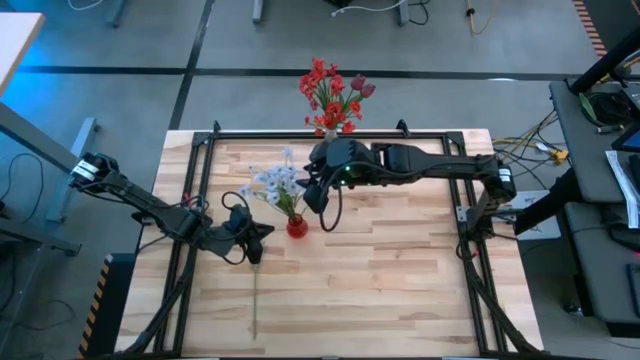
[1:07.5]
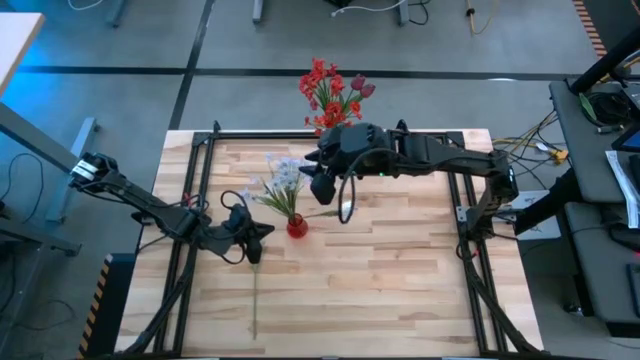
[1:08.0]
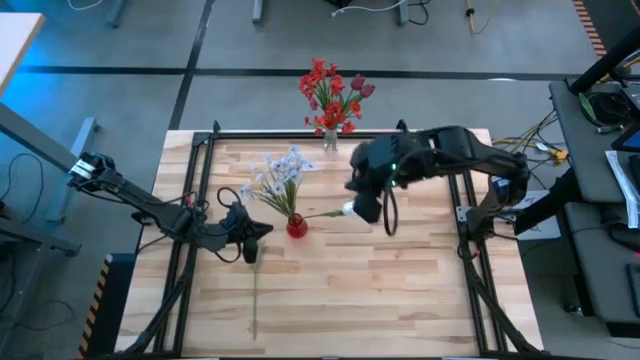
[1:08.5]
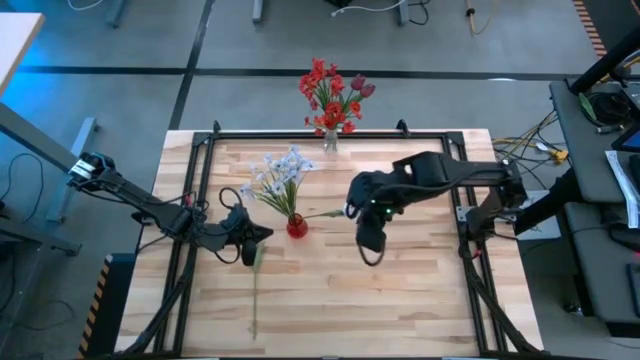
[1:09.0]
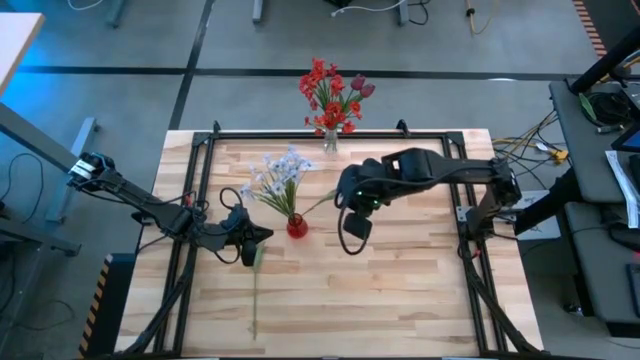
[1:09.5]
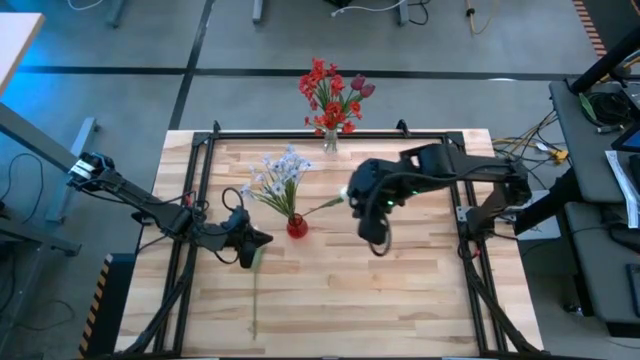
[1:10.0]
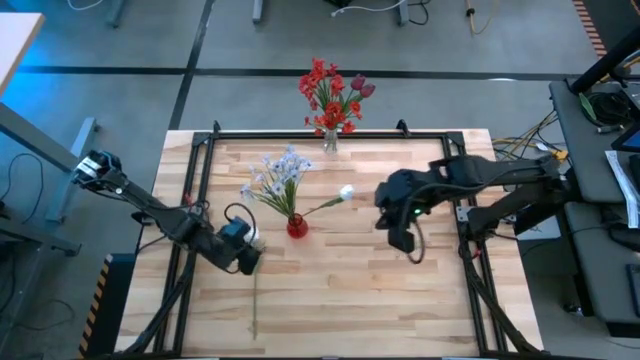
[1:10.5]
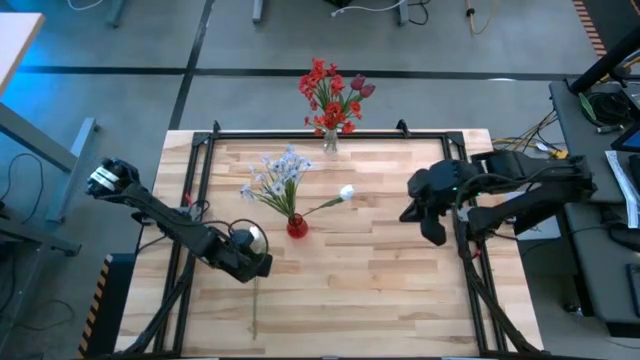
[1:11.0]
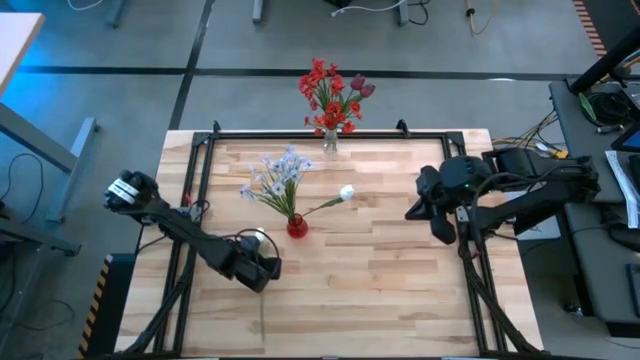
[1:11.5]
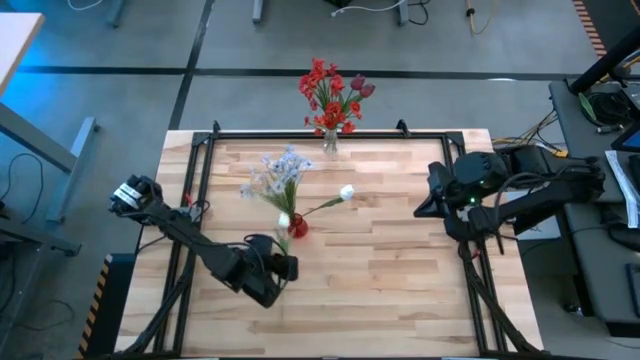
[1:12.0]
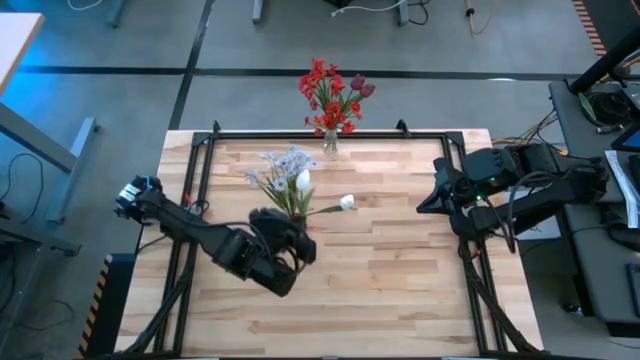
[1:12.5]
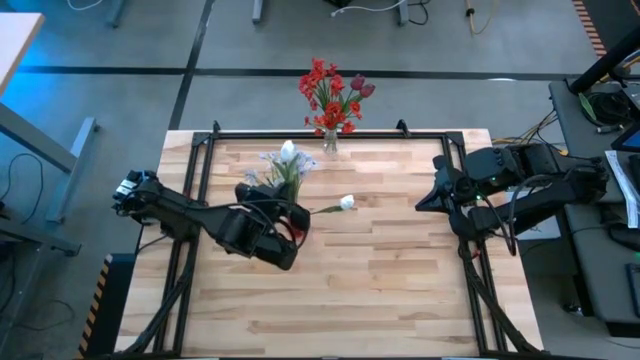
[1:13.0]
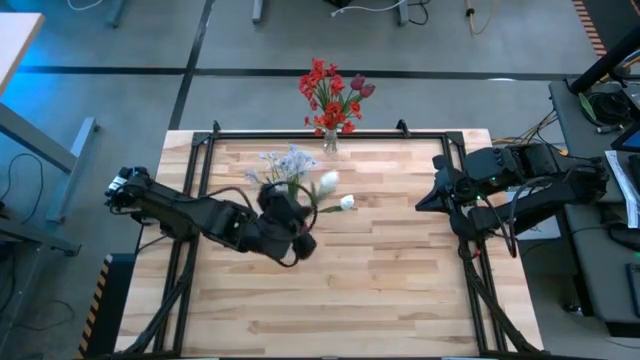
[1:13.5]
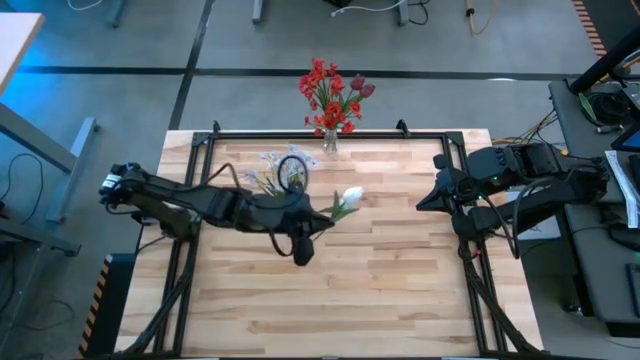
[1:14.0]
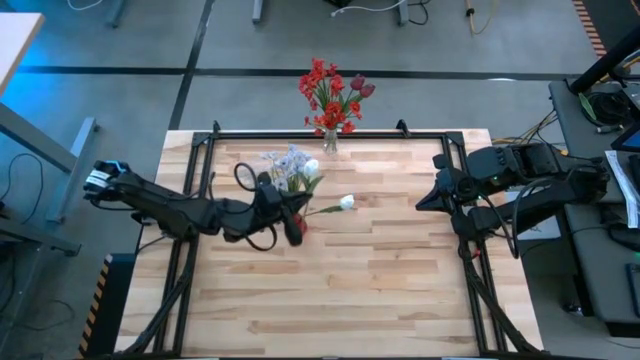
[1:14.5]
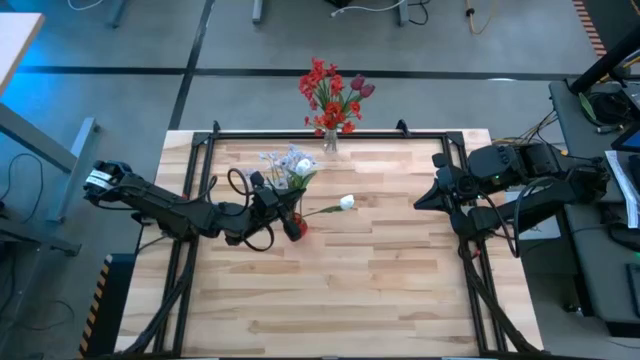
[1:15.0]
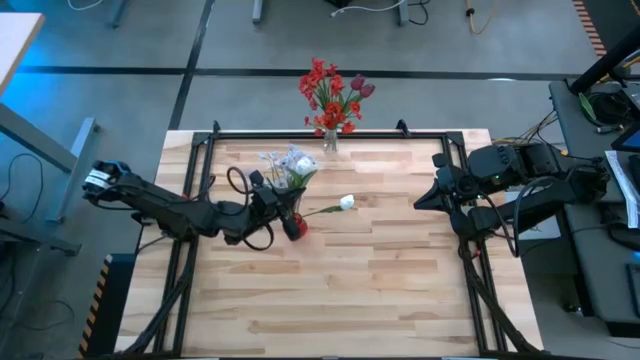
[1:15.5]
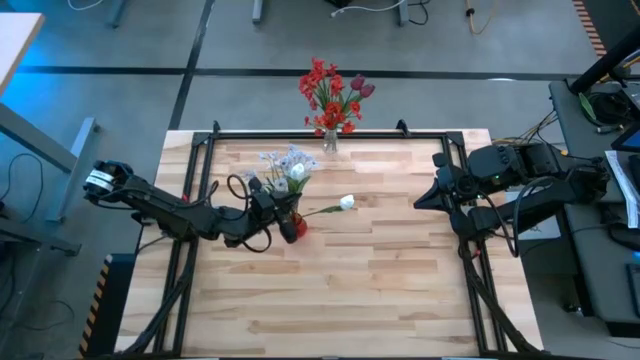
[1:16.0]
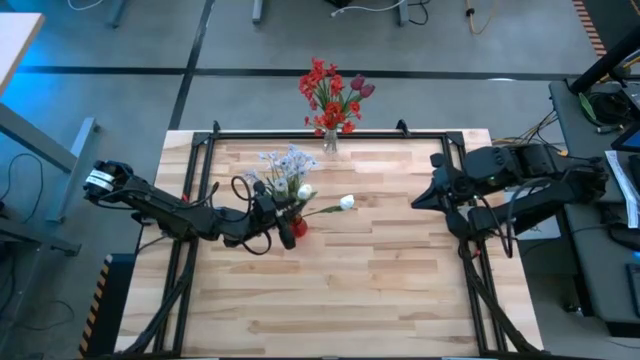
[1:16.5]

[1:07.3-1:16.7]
Task: Sort flowers into vase by color
Put the white tulip into the red vase

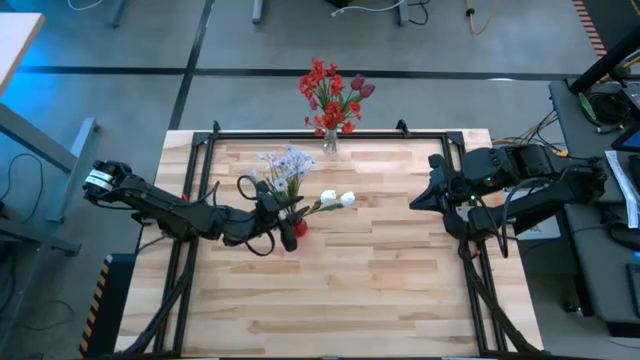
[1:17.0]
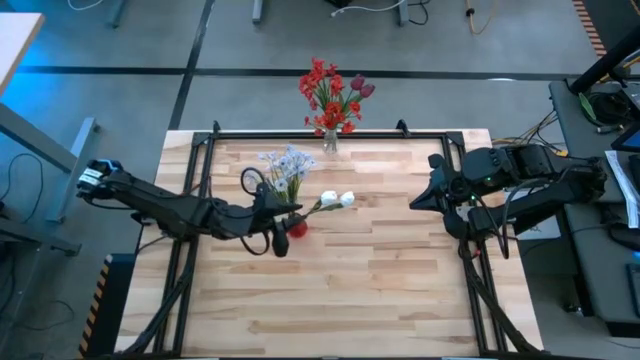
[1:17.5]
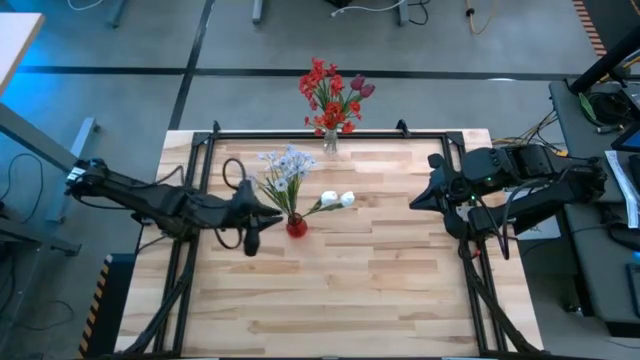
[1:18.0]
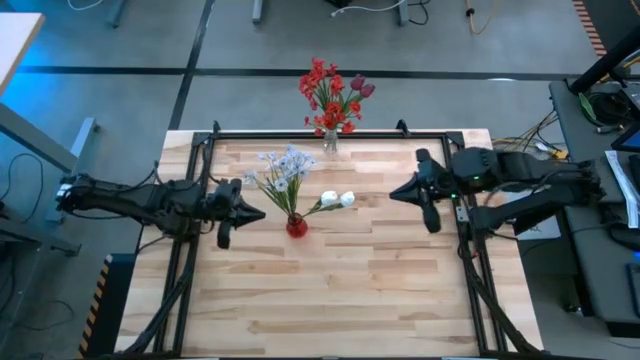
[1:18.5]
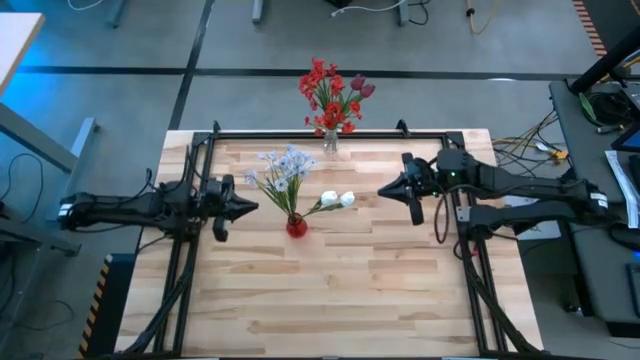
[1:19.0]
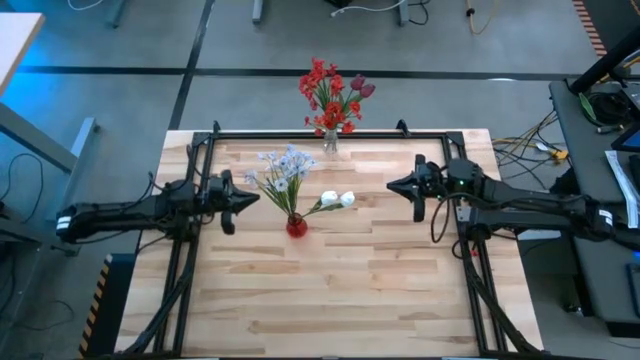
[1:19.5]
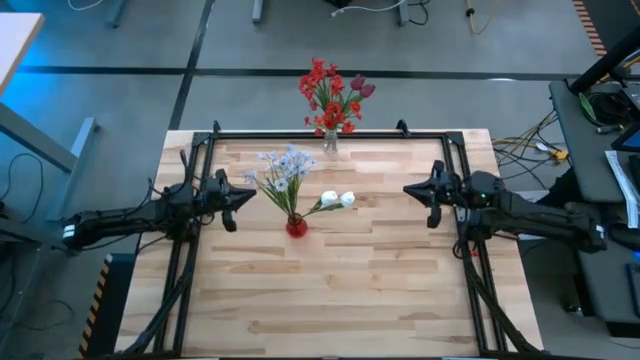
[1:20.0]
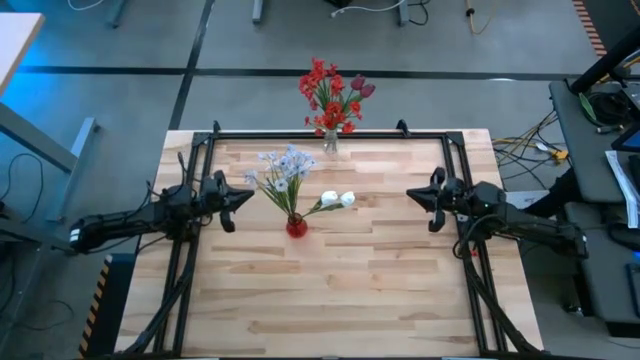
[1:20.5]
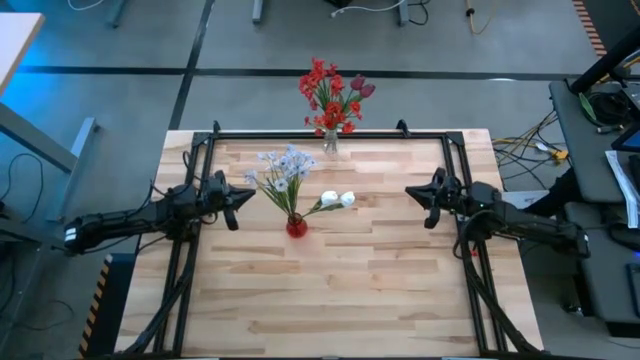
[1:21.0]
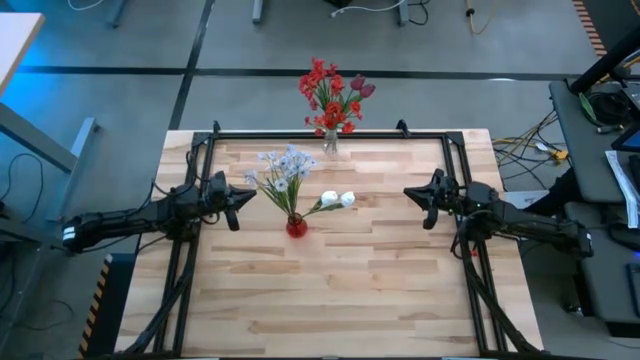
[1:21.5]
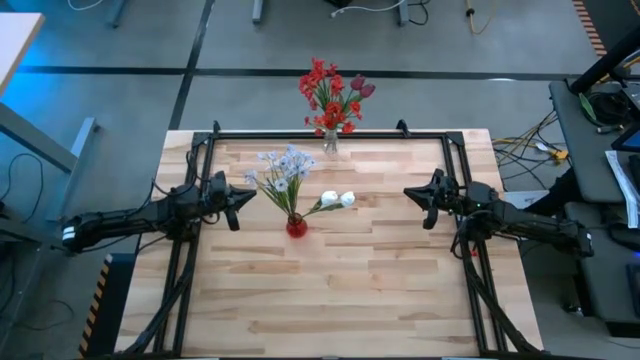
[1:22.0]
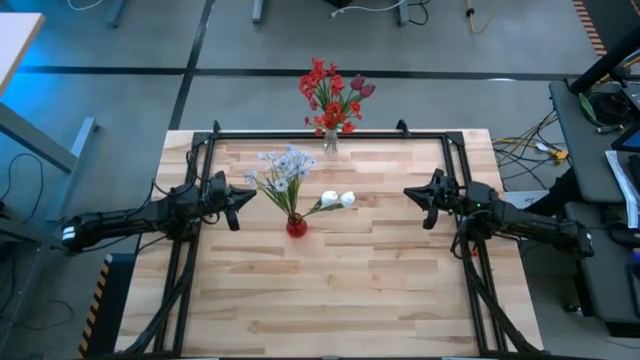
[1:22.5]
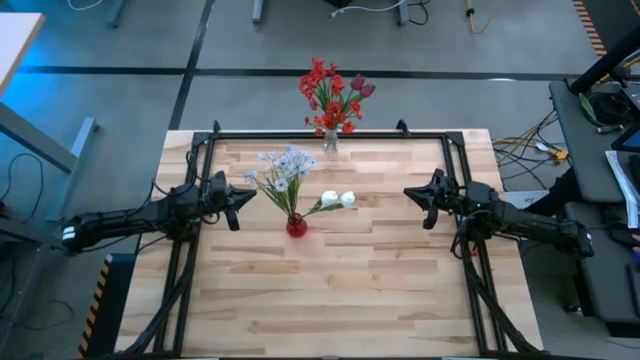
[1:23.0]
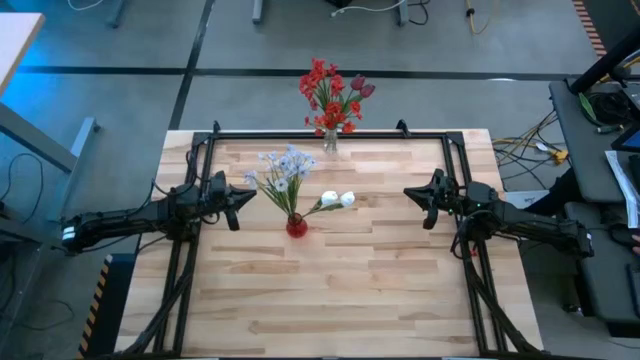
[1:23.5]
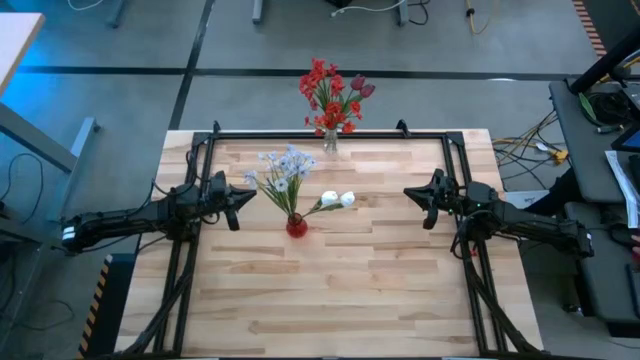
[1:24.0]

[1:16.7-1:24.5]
Return to Home Position

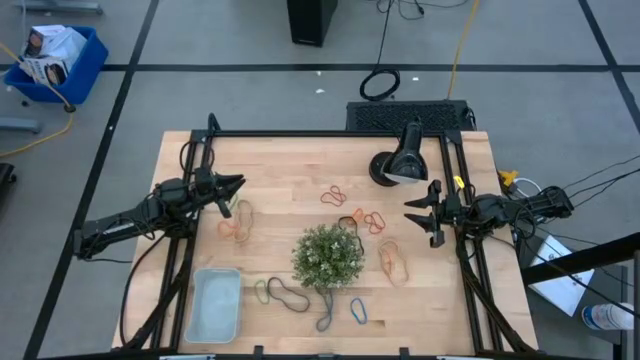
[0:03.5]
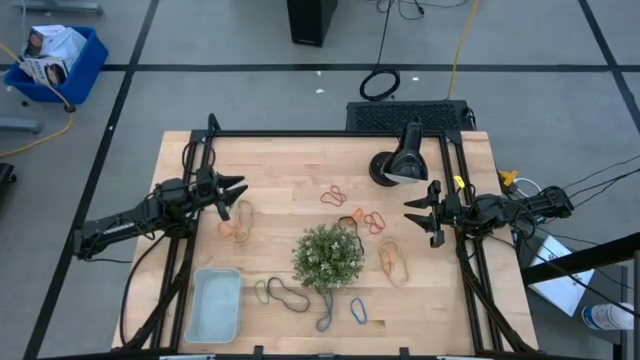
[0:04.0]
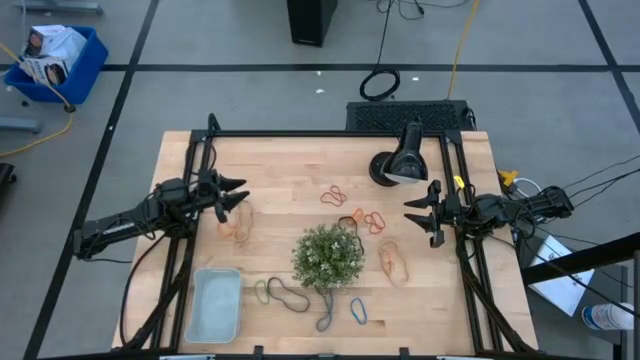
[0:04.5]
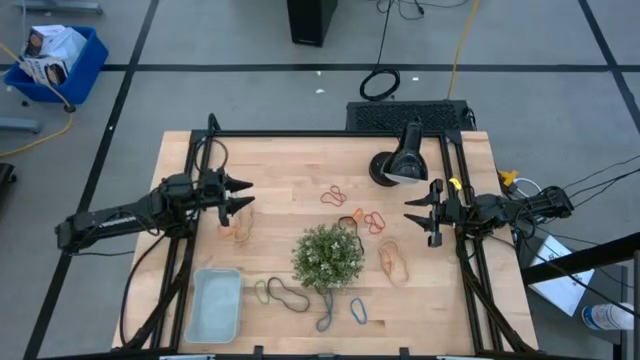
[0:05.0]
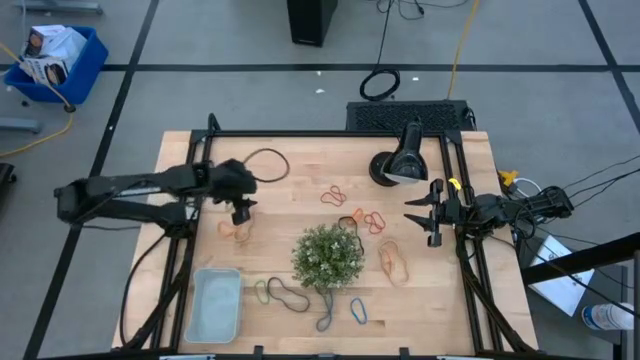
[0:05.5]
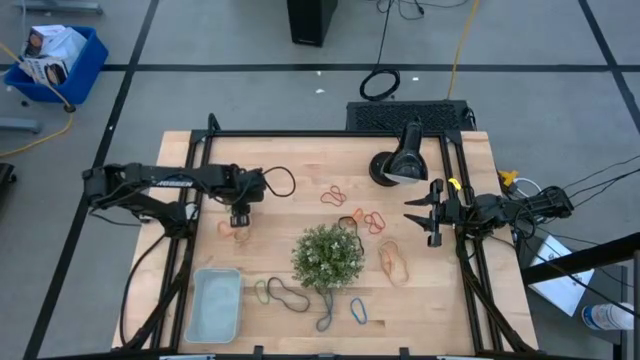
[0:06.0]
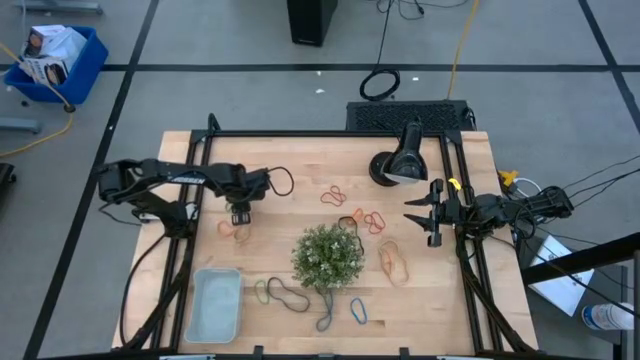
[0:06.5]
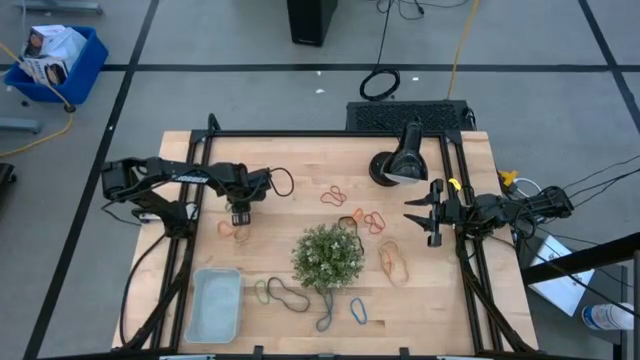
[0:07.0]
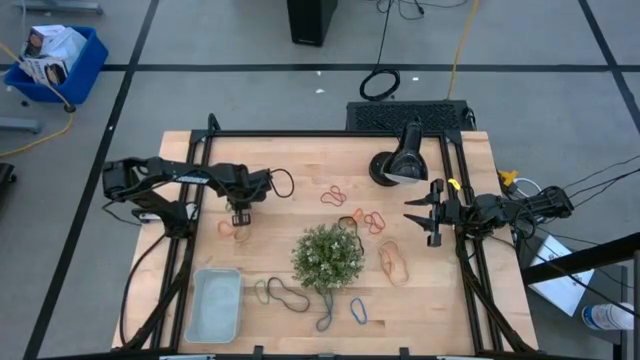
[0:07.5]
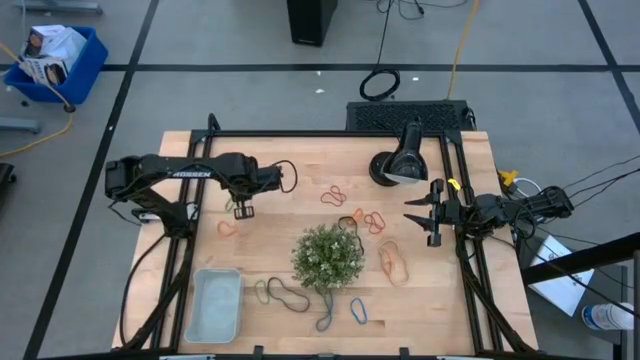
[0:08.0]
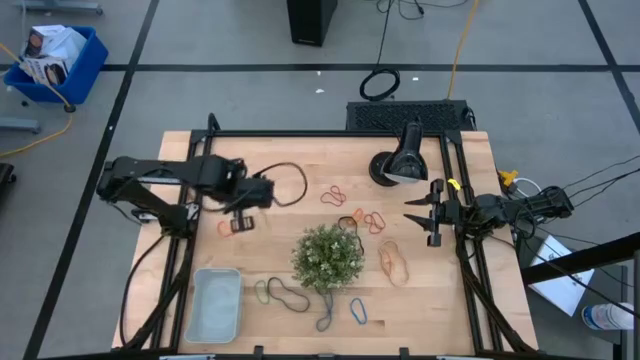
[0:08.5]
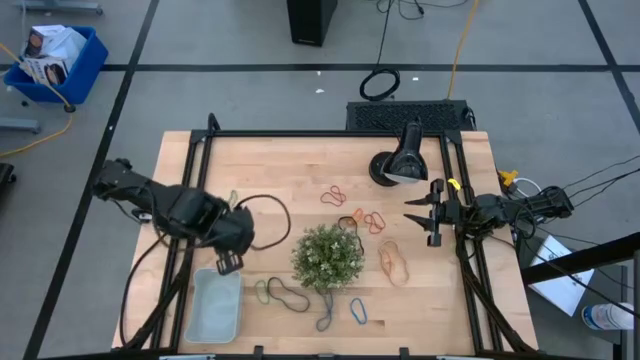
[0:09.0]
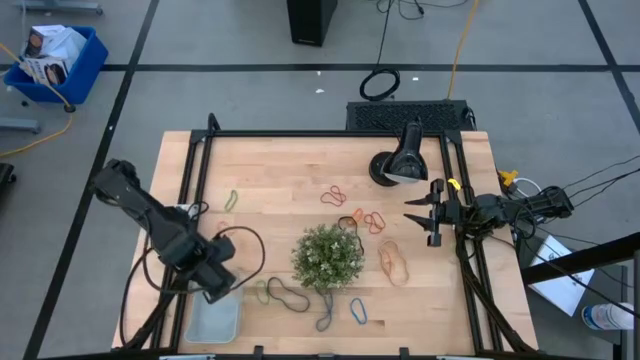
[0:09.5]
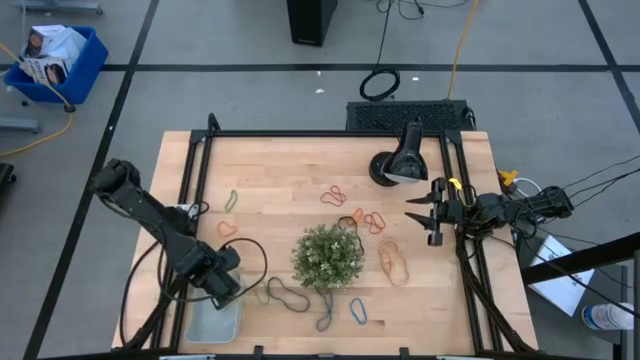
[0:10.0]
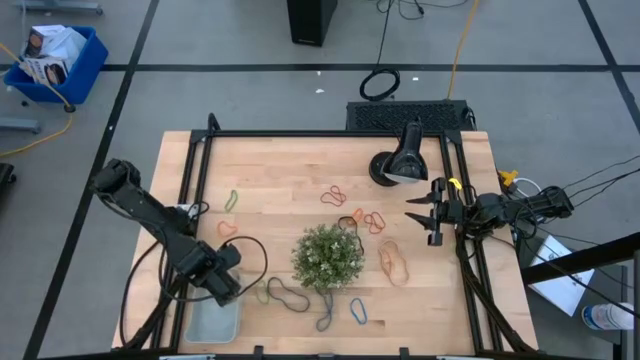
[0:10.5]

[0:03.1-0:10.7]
Task: Pick and place rubber bands into bin
Put the left light brown rubber band into the blue bin
